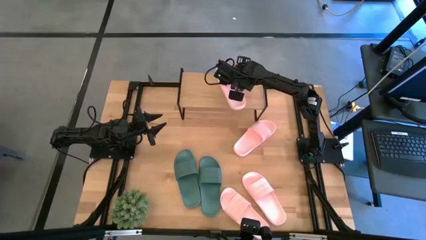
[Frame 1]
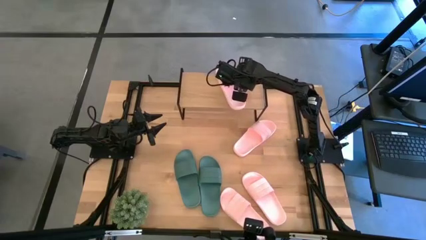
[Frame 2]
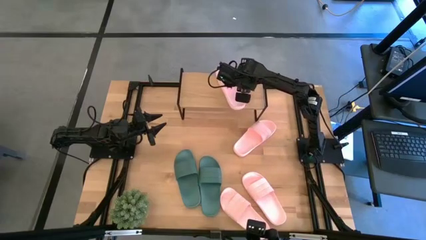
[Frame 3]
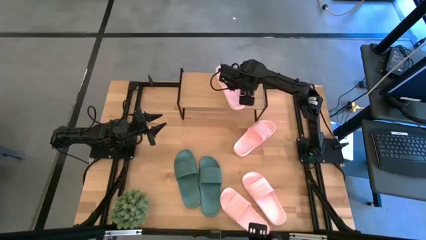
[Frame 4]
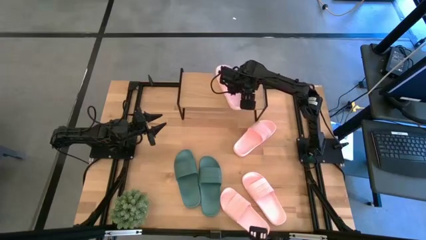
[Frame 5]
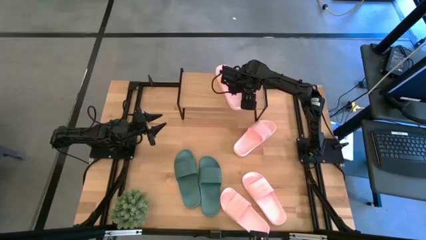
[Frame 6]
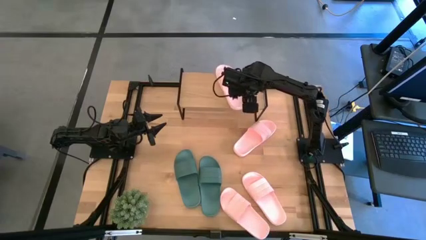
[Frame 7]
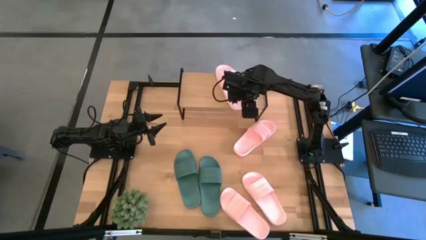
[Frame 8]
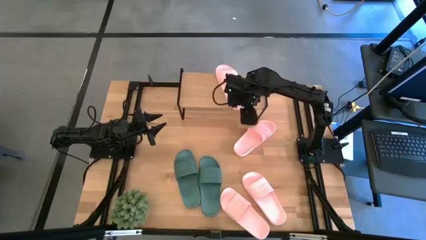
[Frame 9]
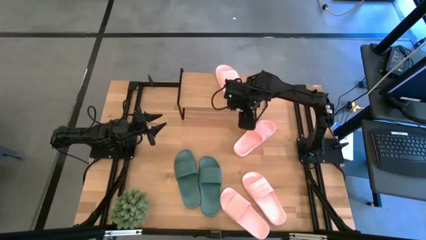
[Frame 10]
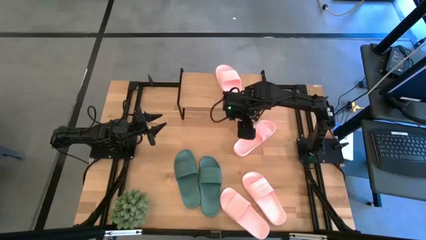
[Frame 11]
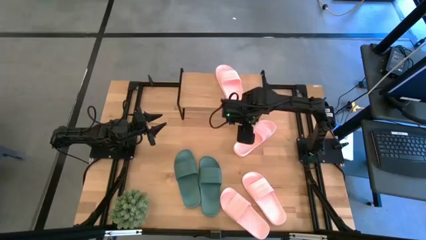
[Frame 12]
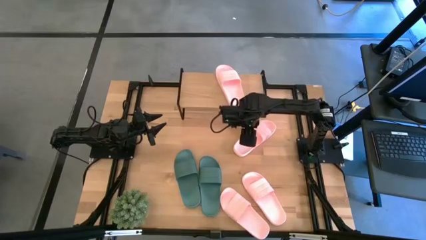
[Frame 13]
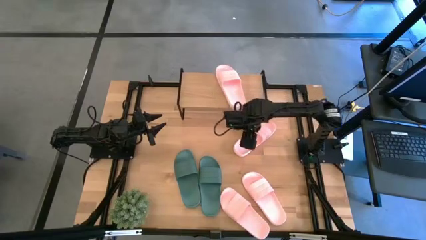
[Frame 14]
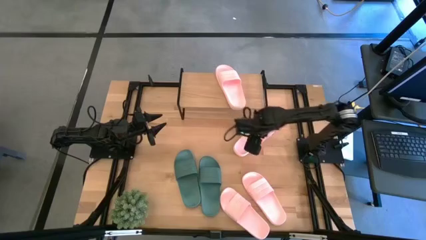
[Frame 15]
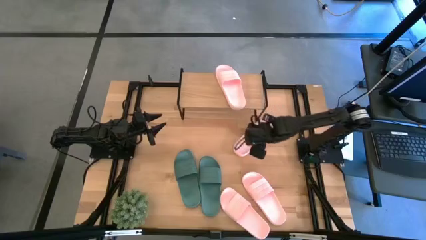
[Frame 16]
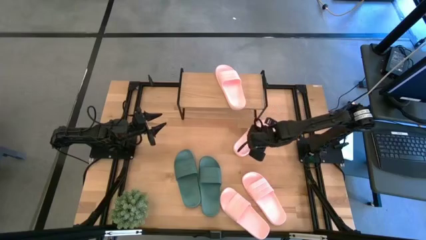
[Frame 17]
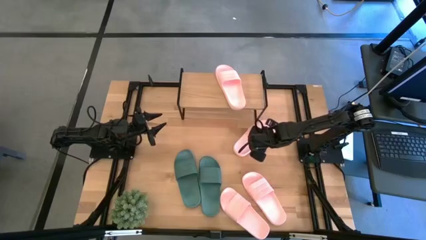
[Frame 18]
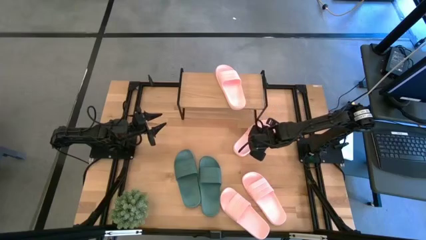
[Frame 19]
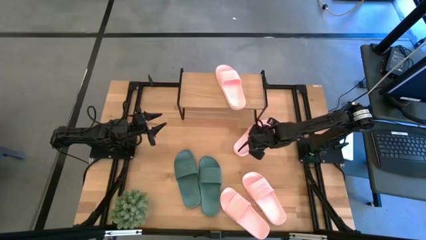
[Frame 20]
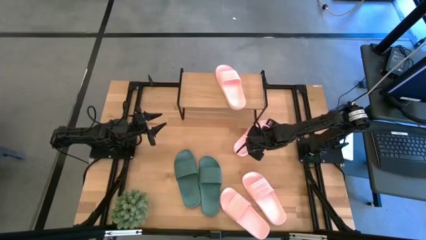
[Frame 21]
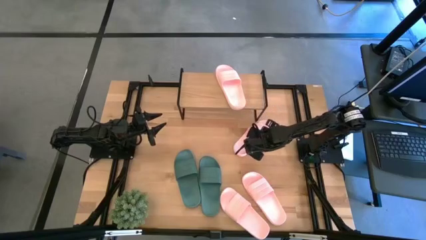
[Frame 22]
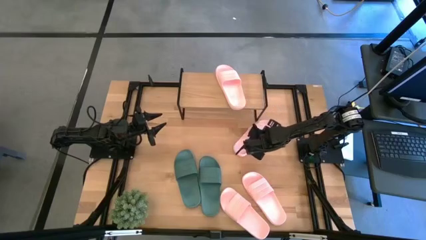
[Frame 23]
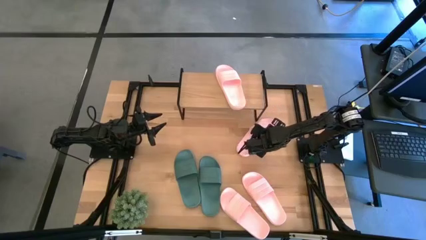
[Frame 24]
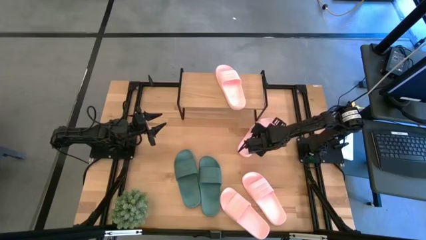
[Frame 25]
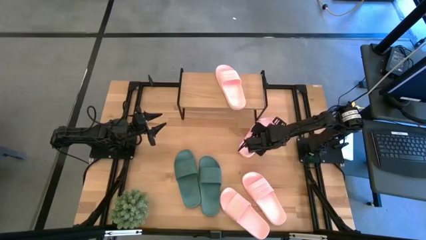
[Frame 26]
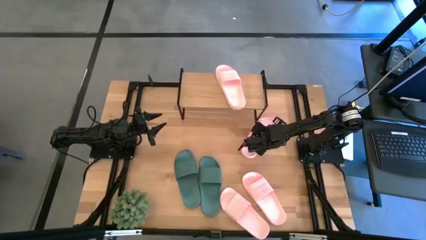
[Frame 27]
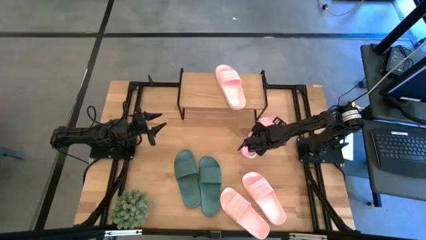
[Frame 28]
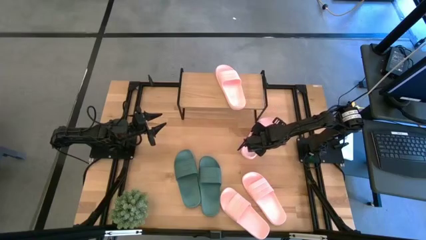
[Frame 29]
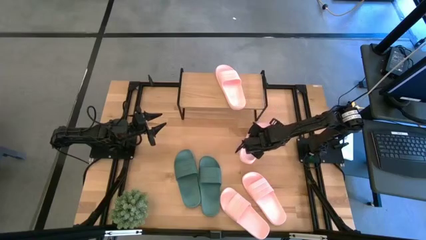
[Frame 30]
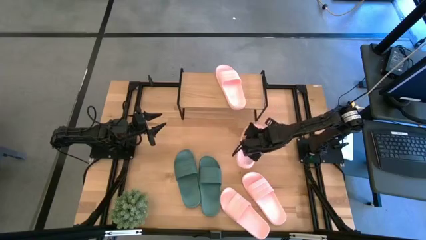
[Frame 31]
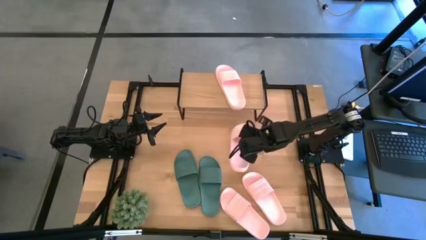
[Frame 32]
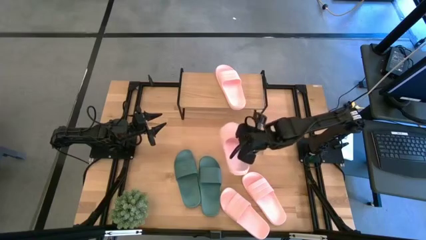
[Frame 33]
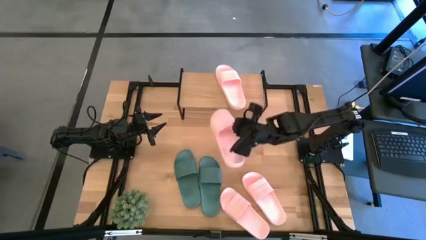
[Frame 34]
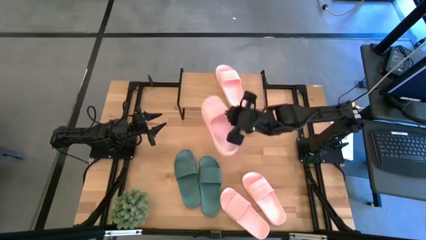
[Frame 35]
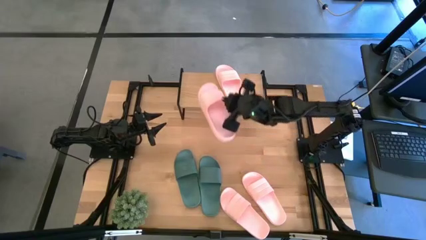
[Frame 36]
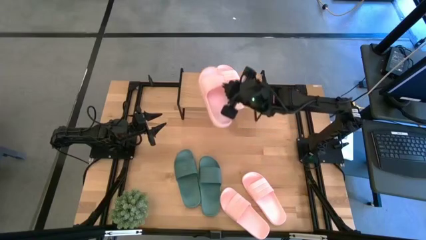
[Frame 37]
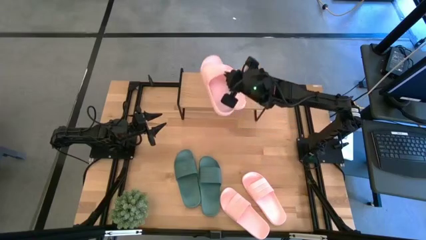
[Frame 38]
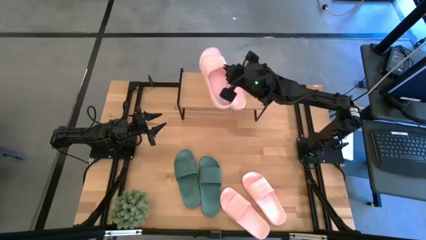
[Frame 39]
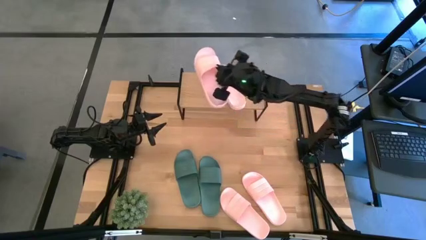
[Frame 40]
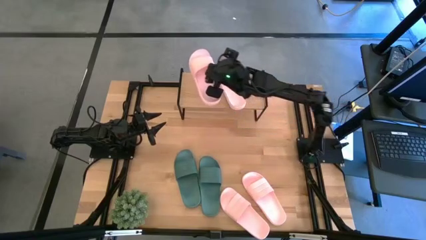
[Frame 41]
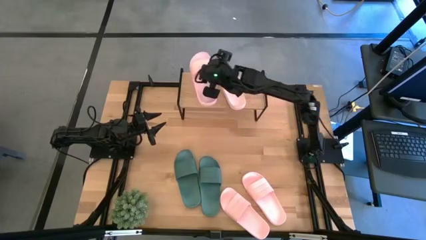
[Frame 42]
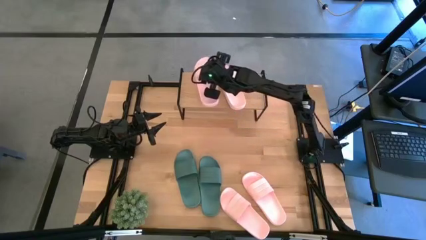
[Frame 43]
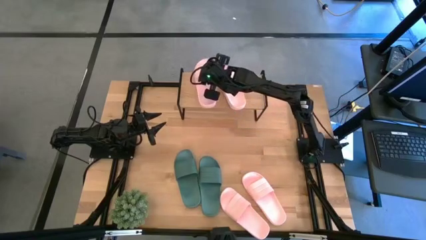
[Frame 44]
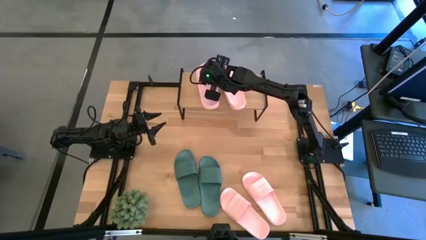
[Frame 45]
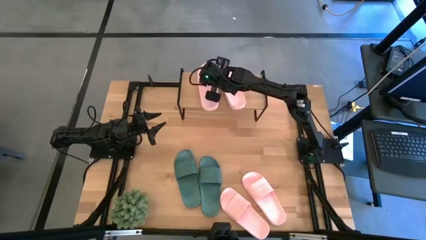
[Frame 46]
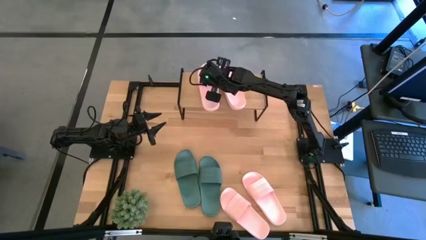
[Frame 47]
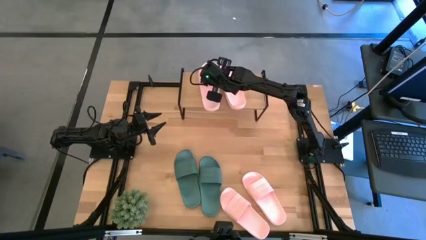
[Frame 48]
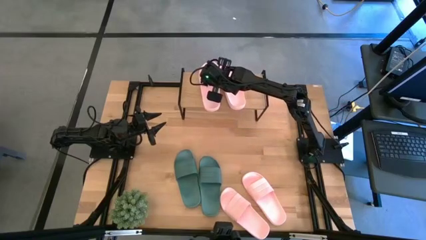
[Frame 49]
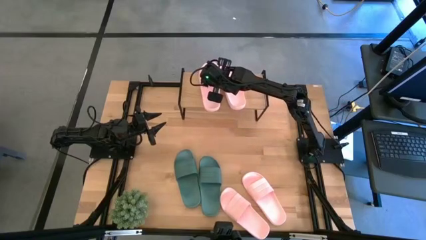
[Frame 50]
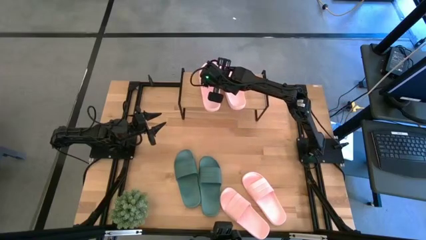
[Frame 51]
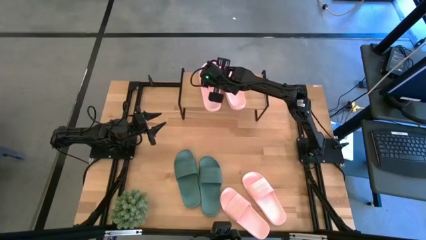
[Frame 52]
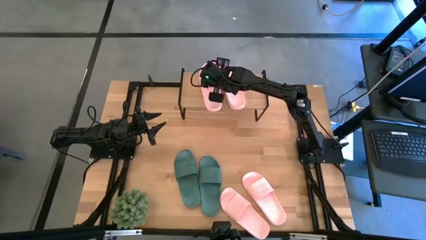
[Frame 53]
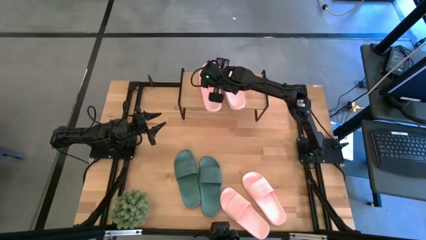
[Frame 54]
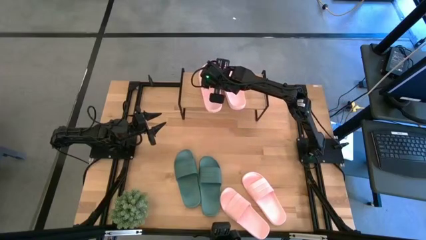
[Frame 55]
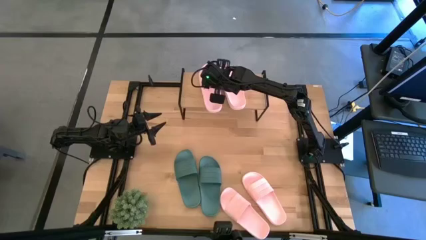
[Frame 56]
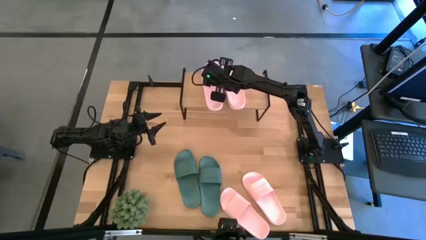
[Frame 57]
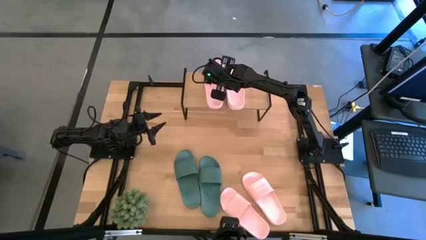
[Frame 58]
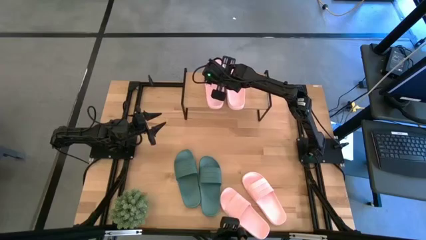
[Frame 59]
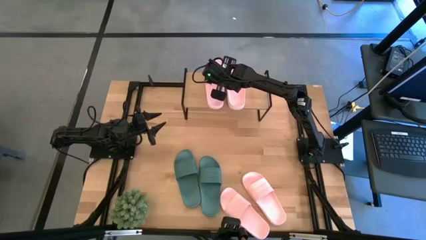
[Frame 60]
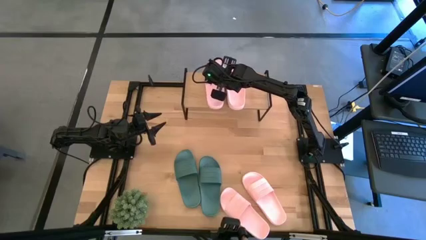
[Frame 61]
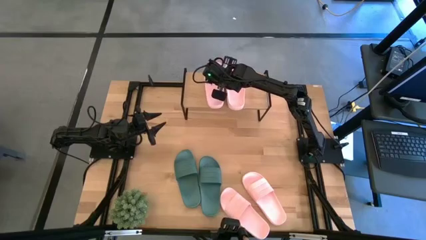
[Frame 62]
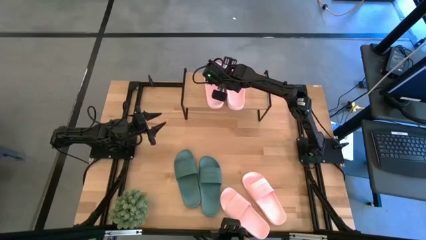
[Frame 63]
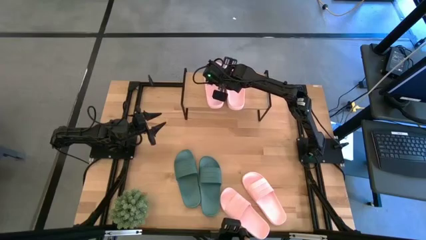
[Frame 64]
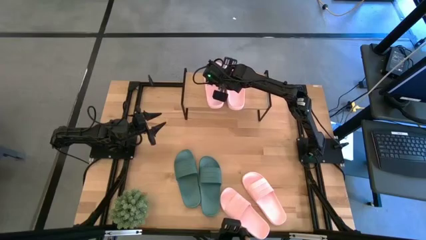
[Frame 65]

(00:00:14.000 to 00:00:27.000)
Task: Pick and place slides into the shelf
Put the pink slide on the shelf

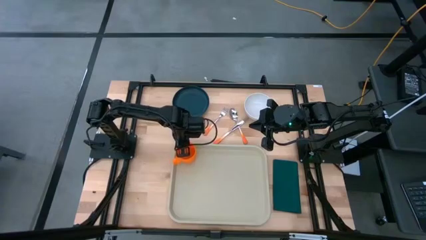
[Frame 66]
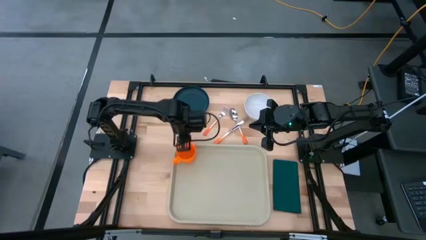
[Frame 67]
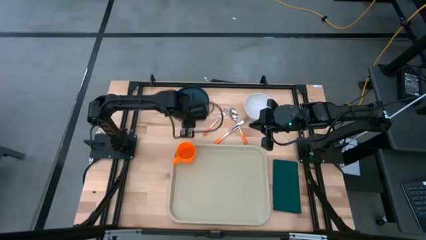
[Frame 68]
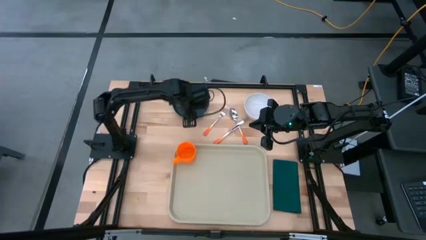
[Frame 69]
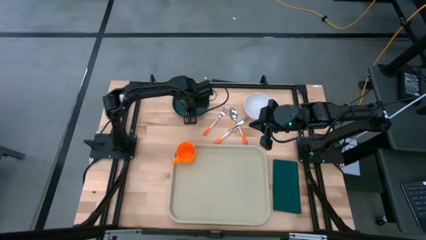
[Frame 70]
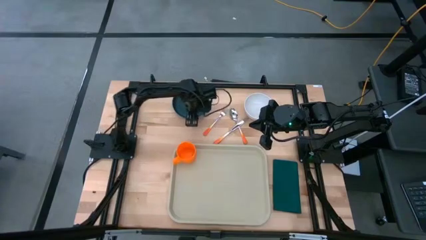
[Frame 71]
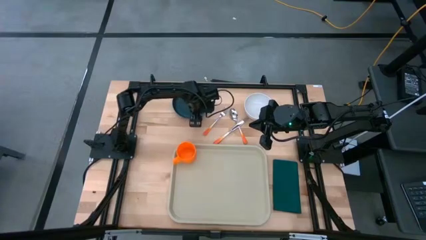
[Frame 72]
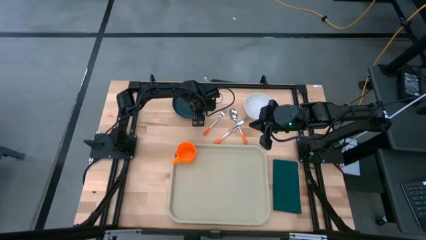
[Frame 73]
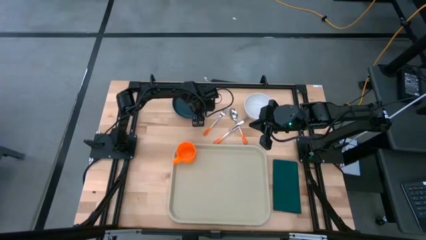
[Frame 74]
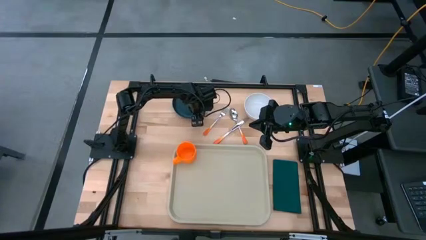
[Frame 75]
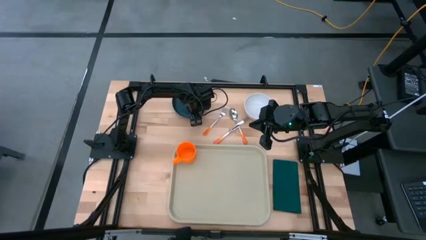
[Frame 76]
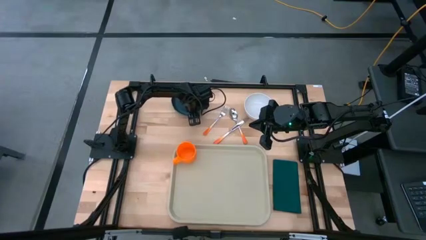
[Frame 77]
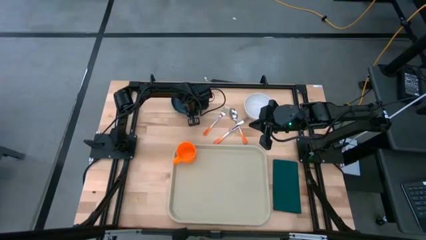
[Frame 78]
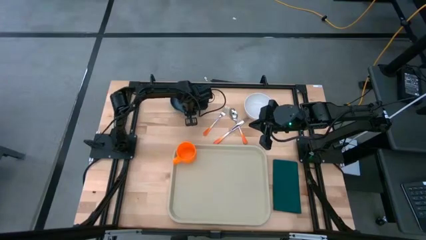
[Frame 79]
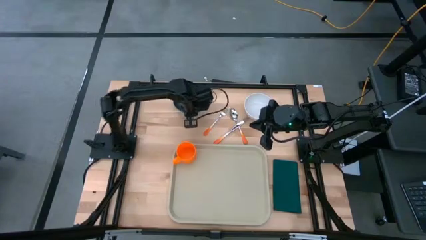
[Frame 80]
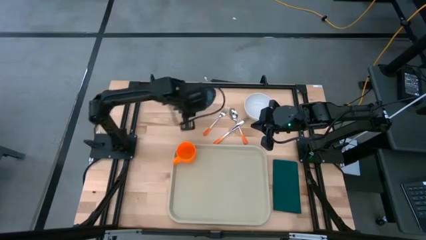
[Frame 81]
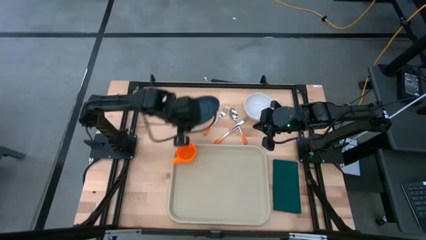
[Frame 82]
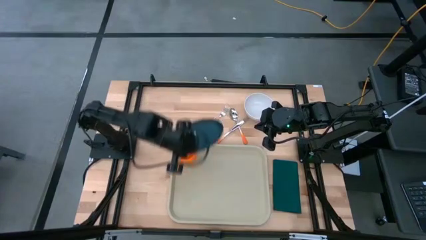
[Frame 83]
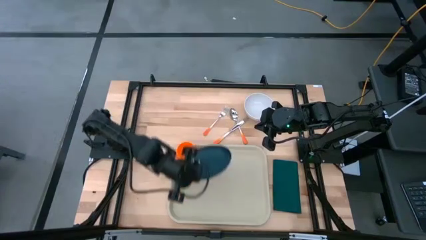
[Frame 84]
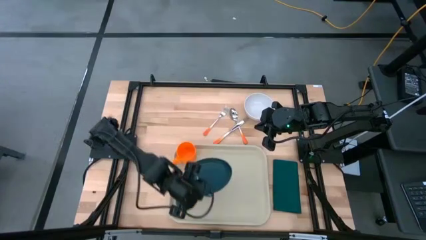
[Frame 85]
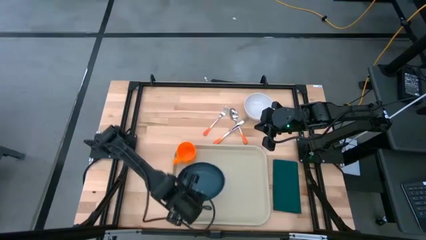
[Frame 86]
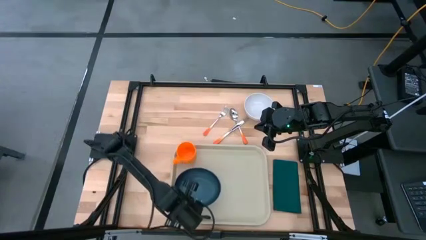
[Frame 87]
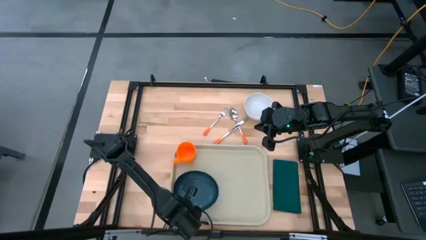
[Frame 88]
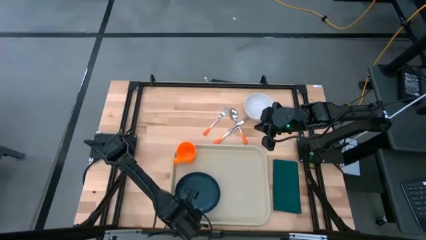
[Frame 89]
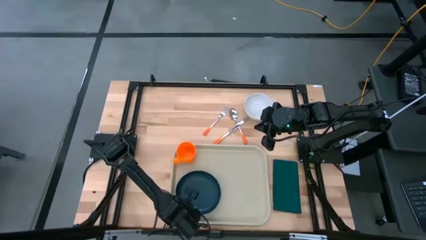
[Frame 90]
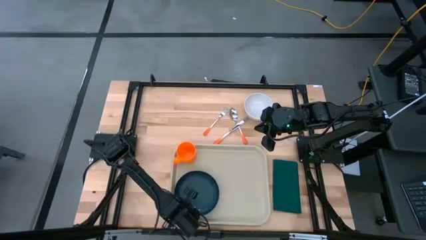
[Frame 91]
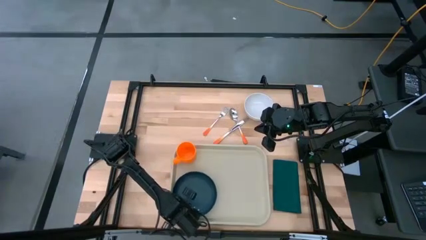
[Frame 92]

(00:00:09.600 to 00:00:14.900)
Task: Set up tray
Put the black plate on the brown serving tray below the orange mug
